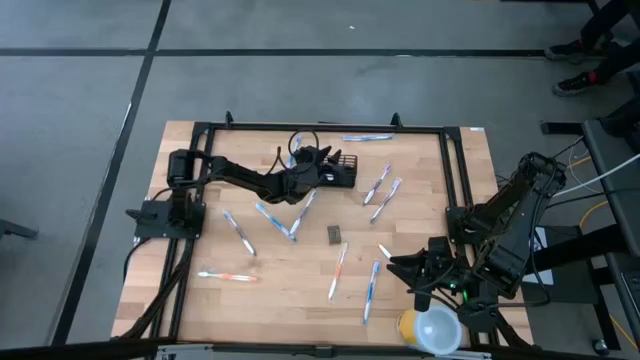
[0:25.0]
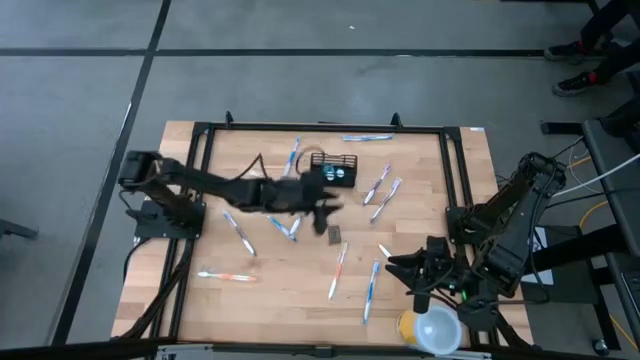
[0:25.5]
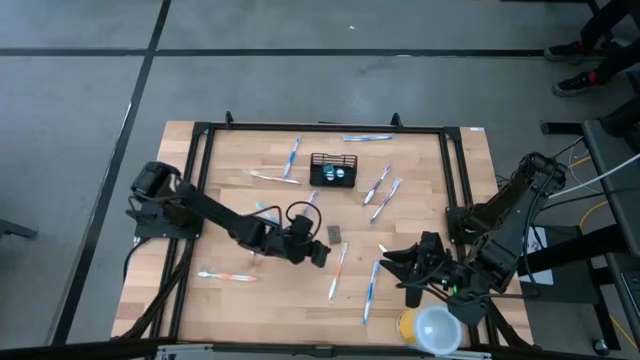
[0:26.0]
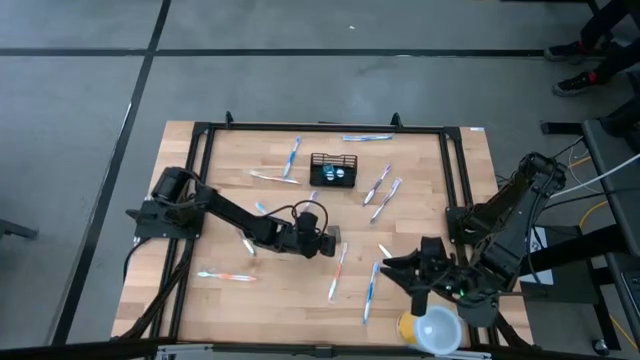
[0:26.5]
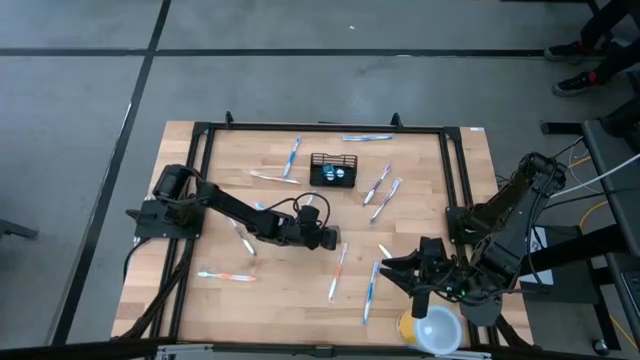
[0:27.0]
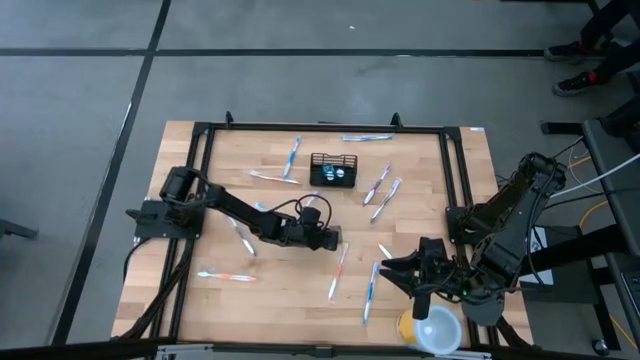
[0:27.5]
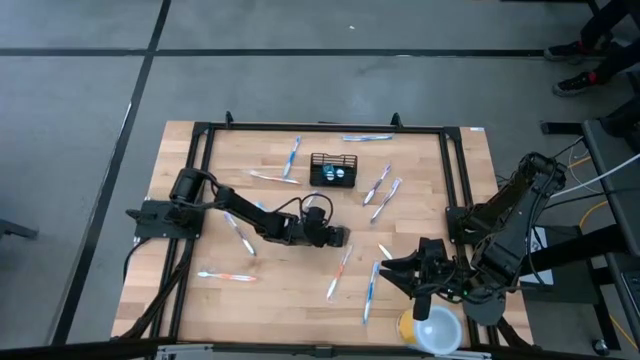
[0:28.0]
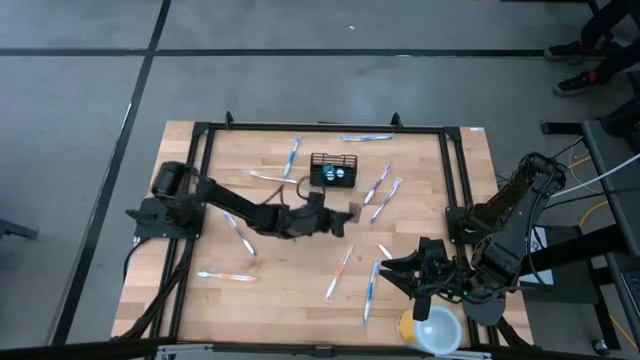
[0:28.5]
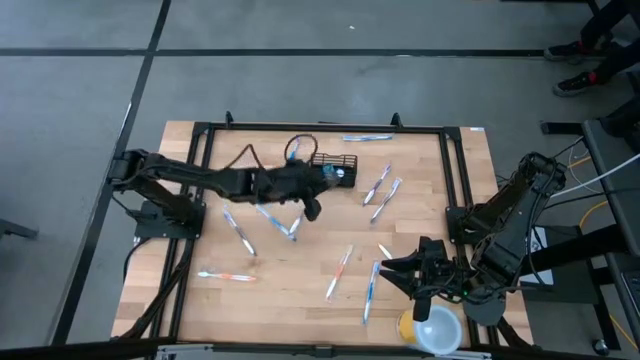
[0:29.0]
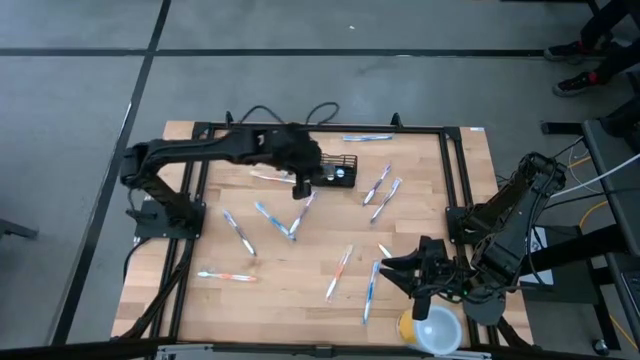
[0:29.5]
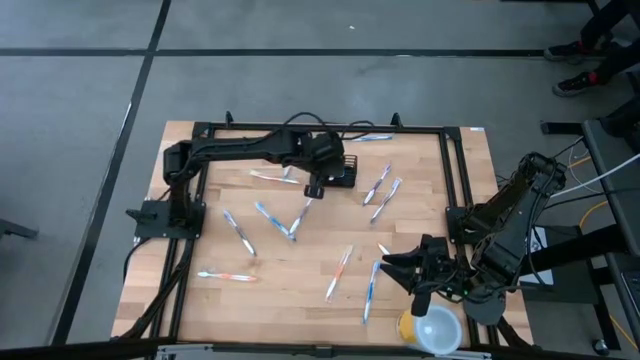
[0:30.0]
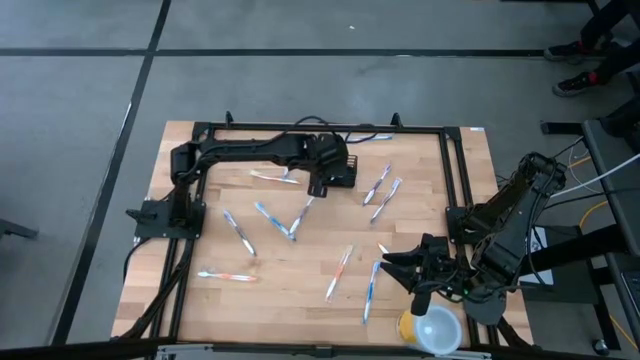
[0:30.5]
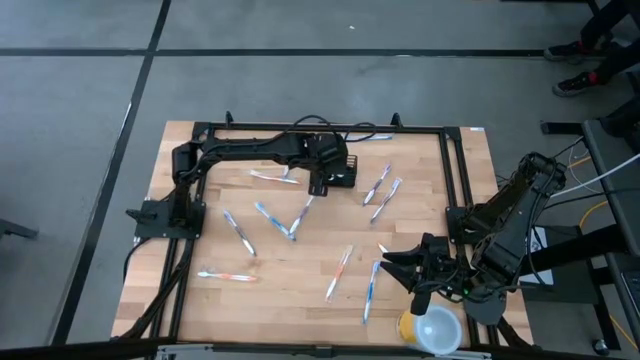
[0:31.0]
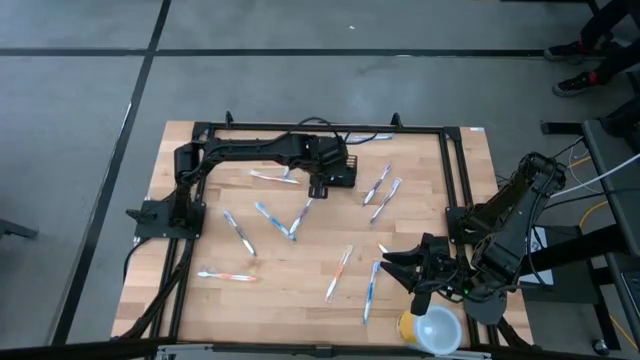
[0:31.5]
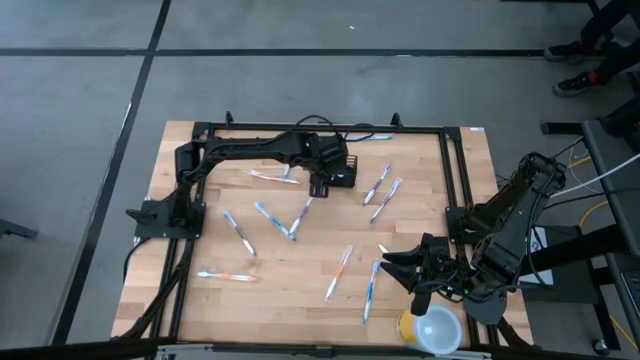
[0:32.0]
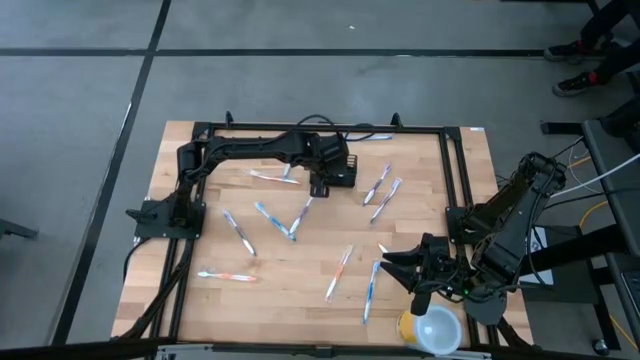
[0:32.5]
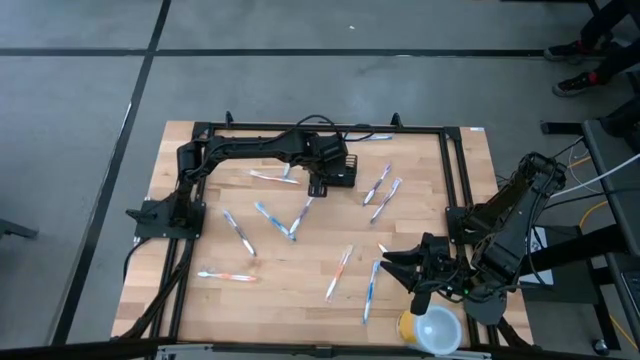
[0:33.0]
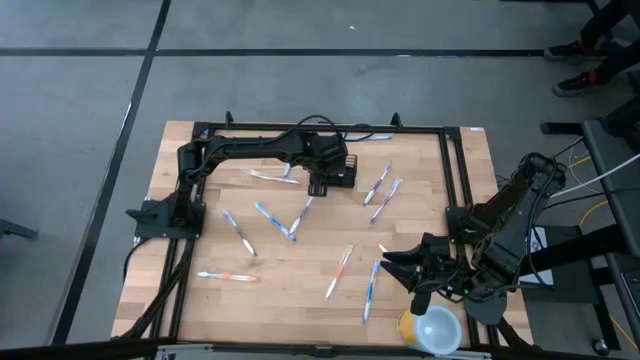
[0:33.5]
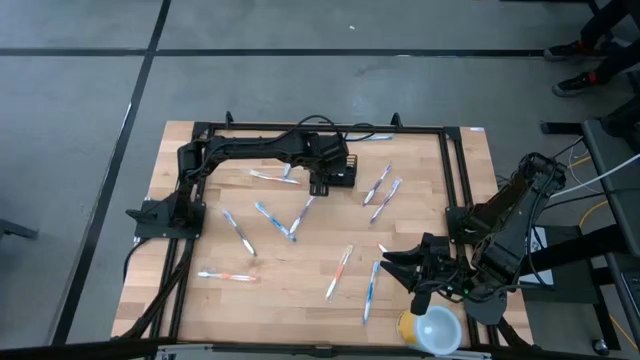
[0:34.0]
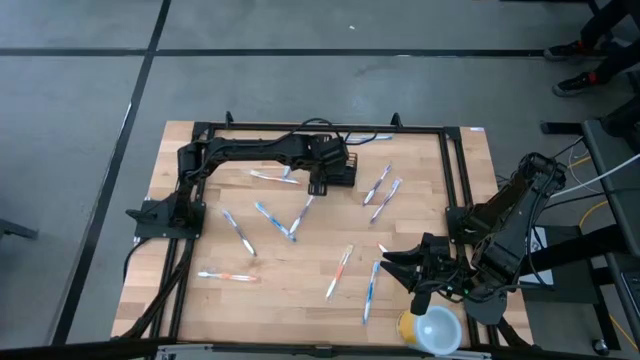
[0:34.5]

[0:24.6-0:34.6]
Task: Pick & Place toothbrushing station
Put the black lid into the middle section of the mesh organizer

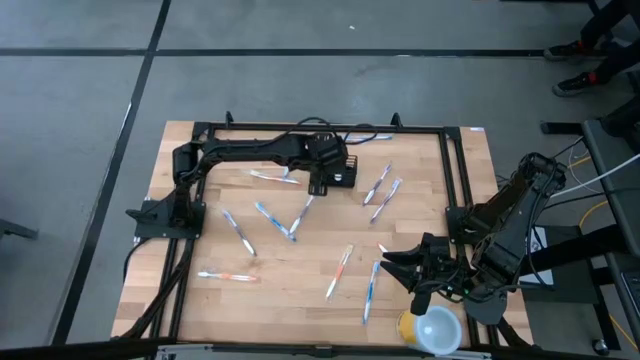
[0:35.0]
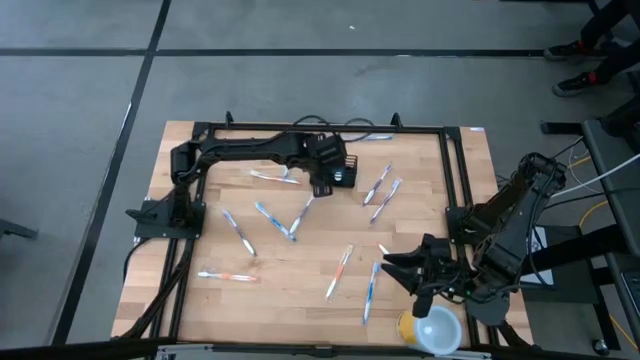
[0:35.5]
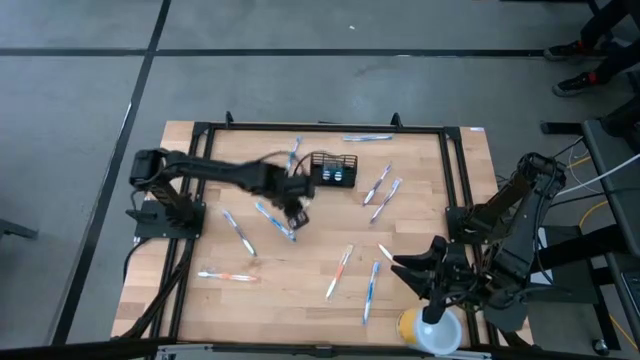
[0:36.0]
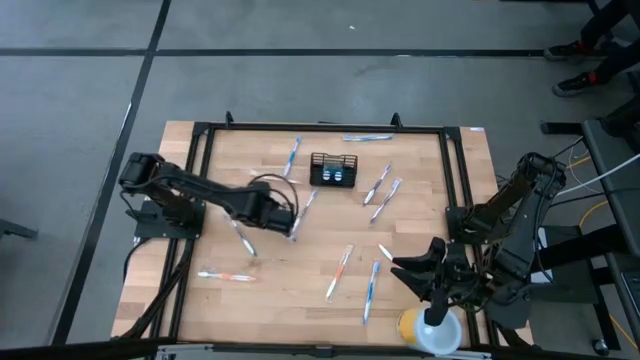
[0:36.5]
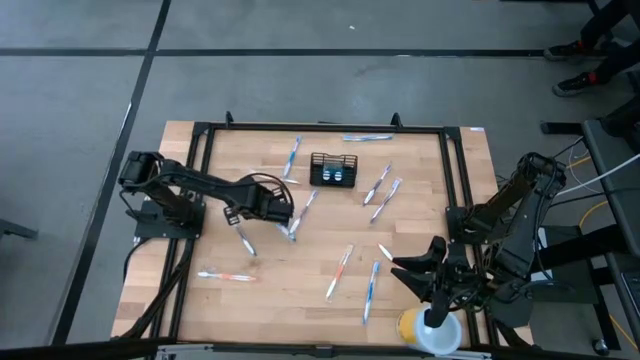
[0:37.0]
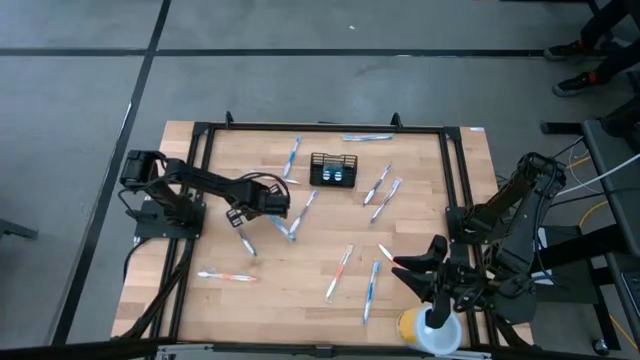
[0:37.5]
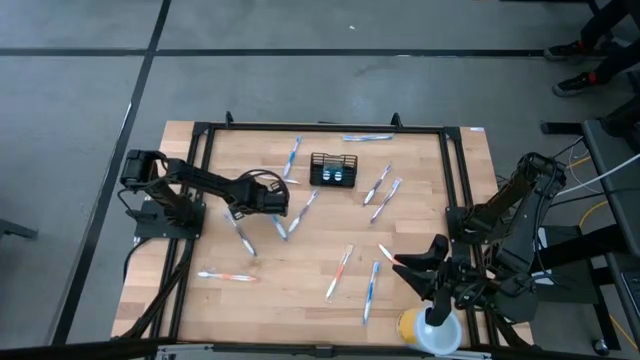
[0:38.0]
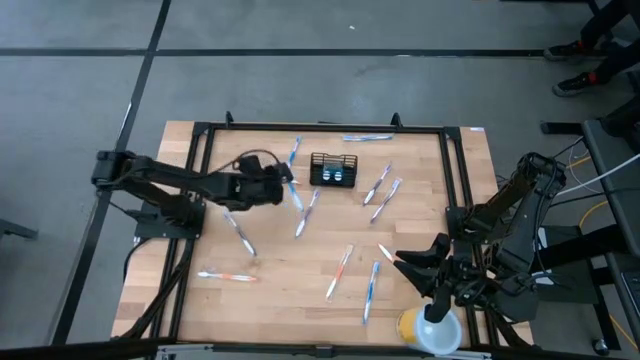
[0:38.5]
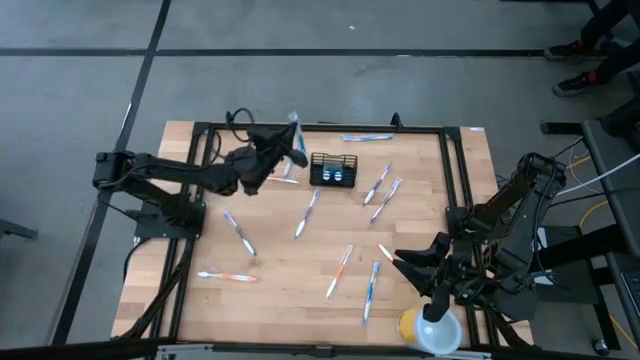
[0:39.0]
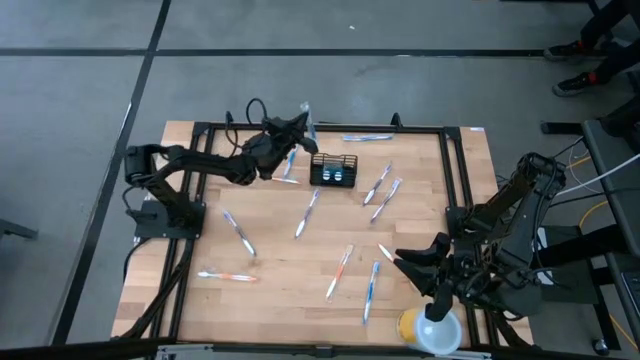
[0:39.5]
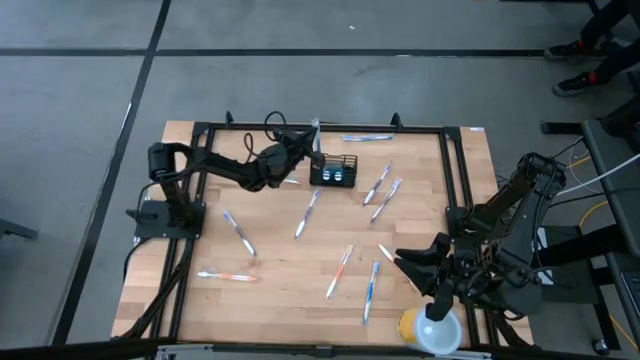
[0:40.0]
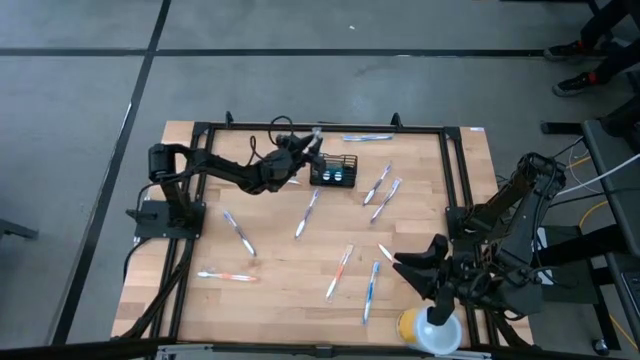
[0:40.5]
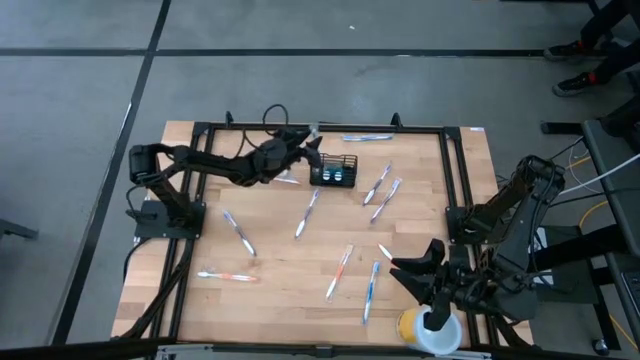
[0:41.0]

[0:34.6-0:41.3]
Put the blue toothbrush into the left section of the mesh organizer

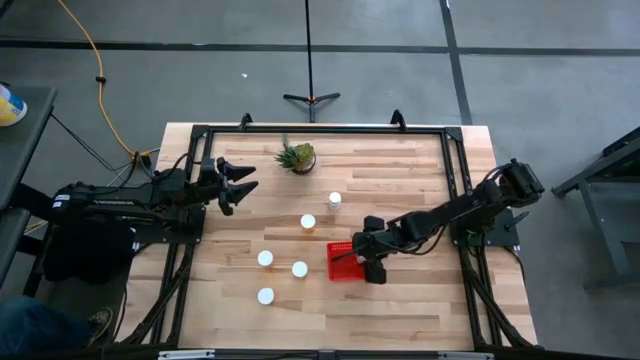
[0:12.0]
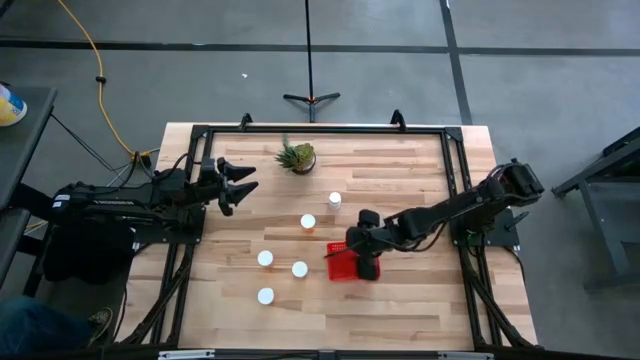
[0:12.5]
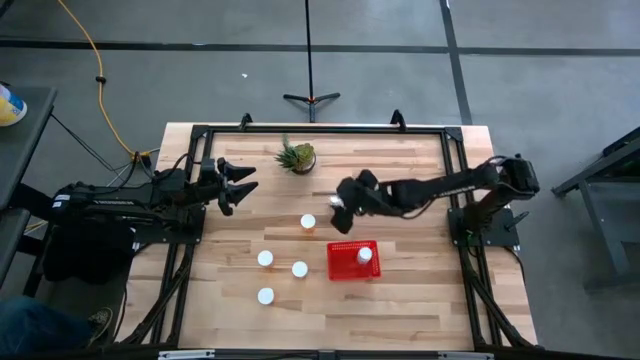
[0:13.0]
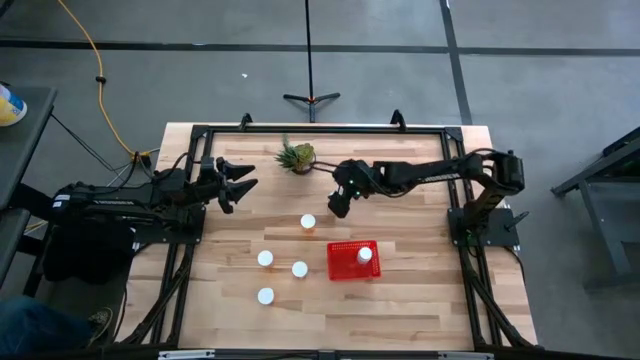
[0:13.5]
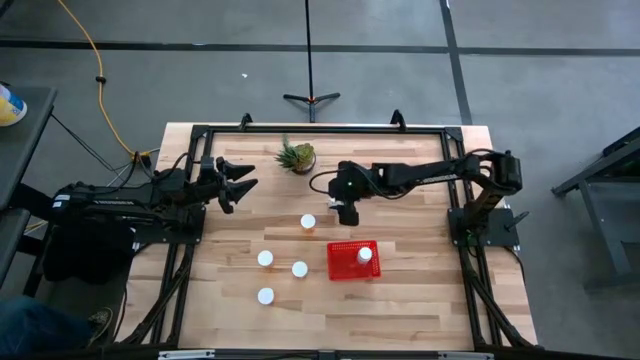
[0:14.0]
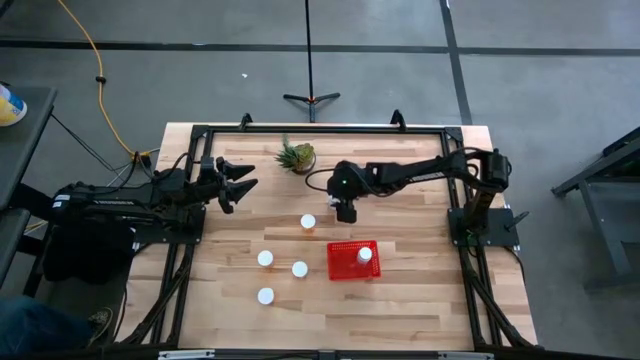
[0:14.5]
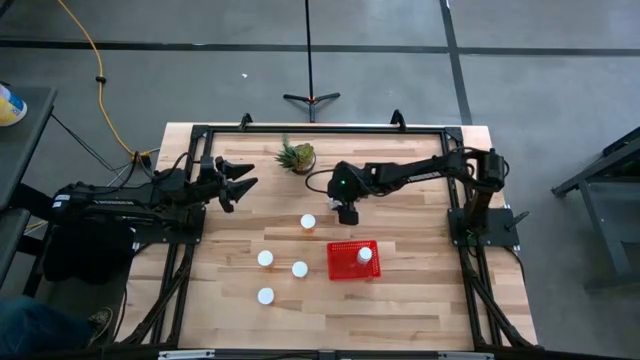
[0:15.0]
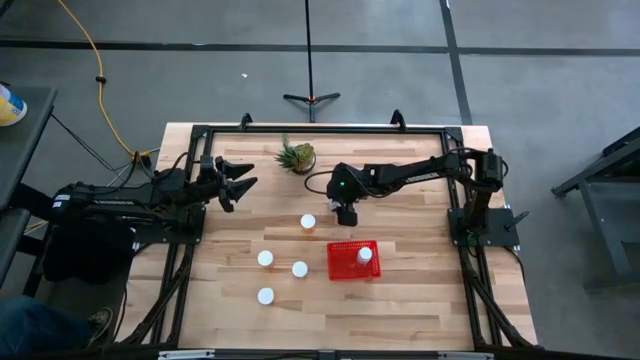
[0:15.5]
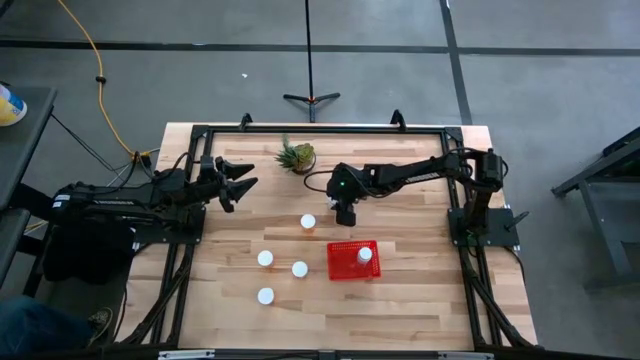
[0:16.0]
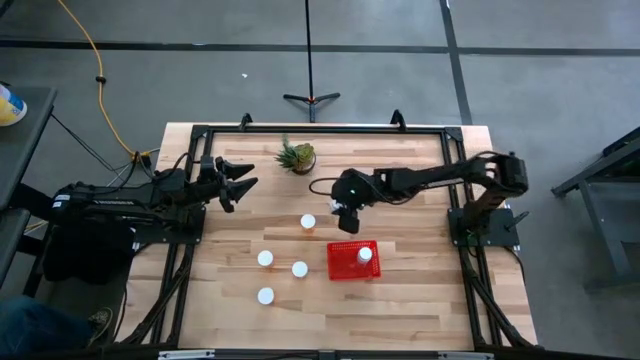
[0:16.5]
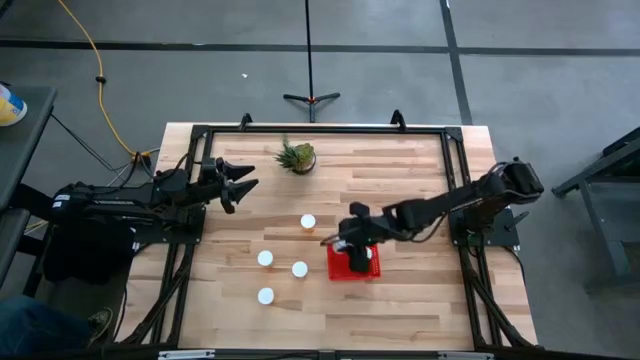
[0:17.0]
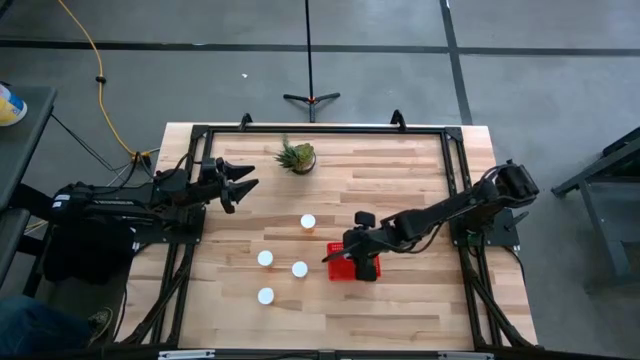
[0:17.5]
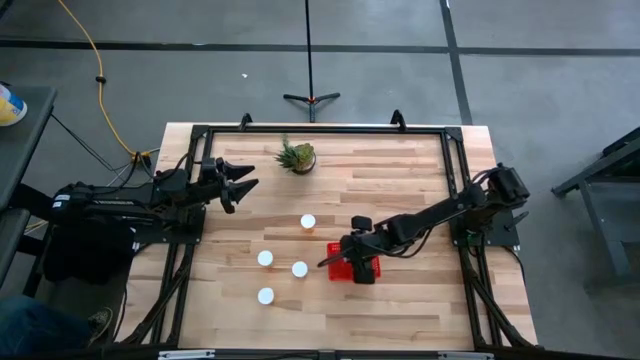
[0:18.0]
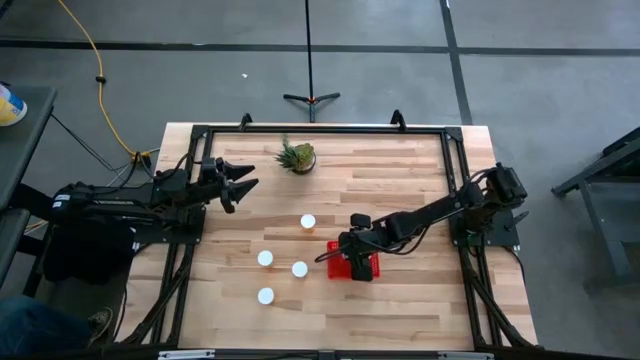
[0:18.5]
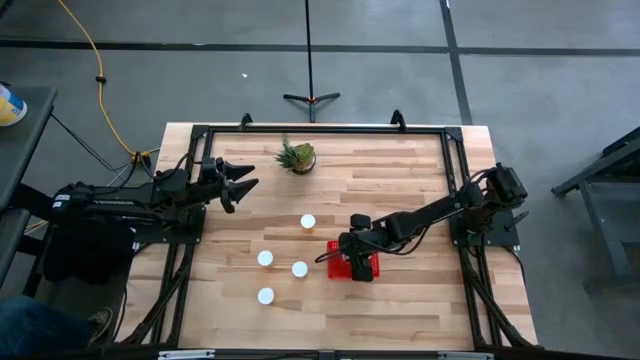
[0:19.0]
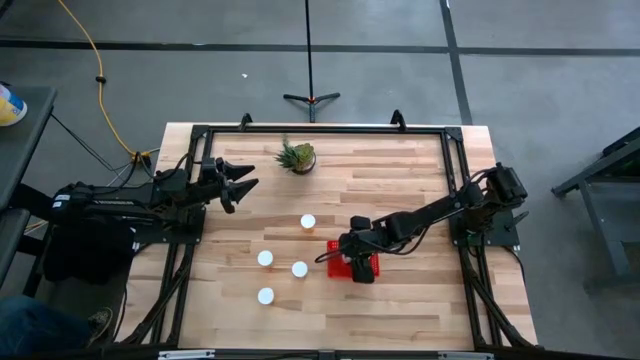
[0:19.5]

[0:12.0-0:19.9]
Task: Pick and place pill bottles into a basket
Put the white pill bottle into the red bin
